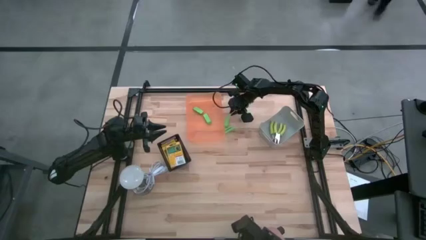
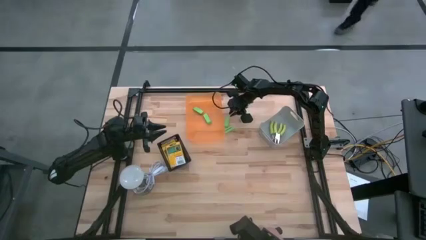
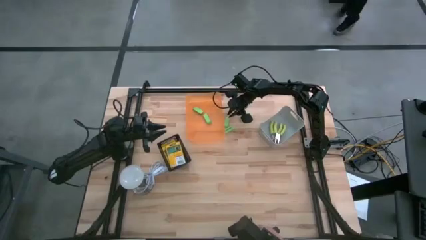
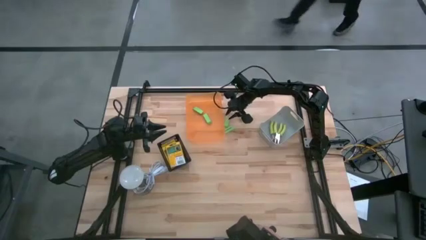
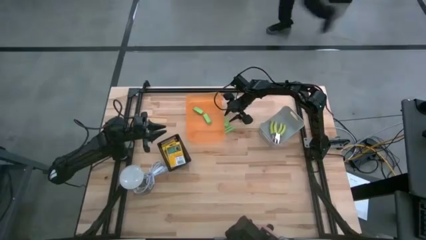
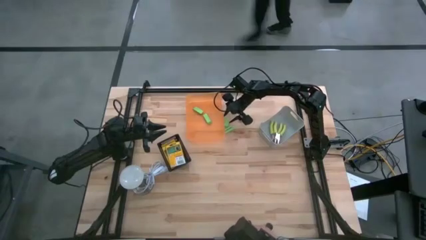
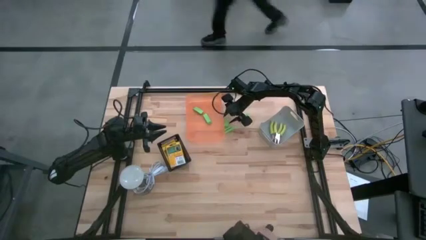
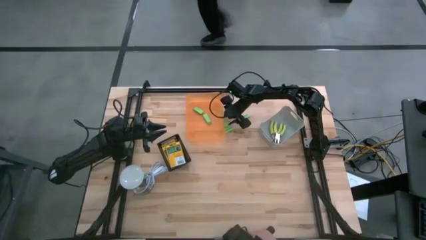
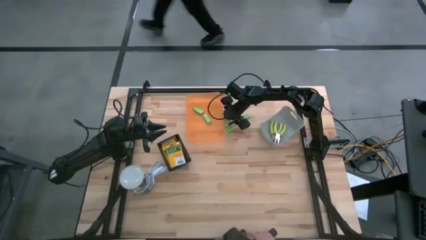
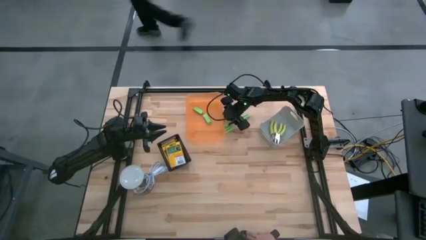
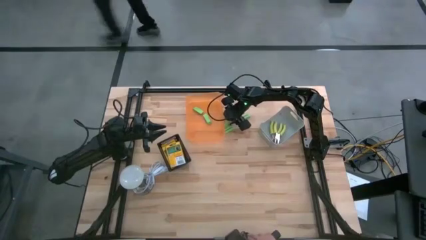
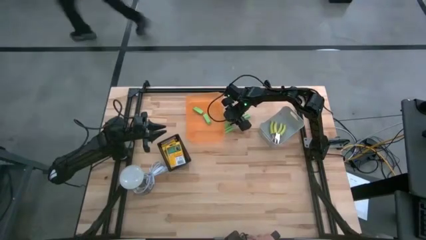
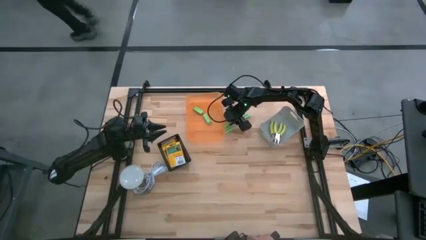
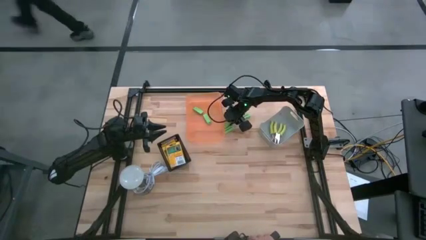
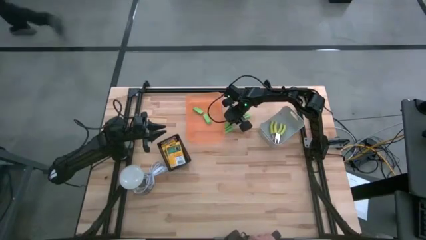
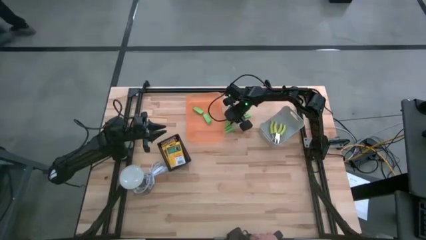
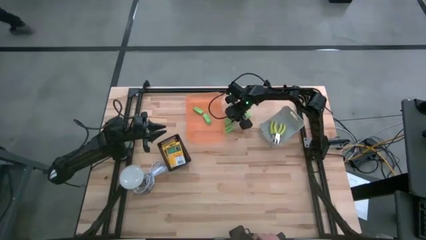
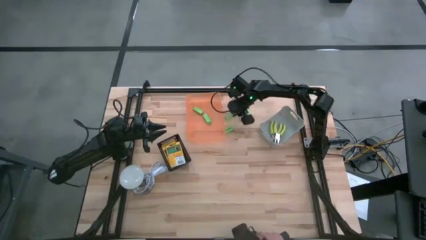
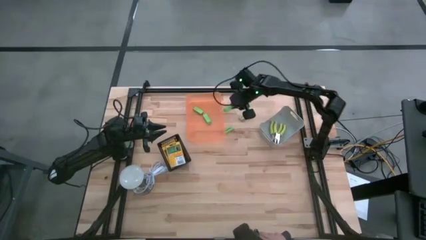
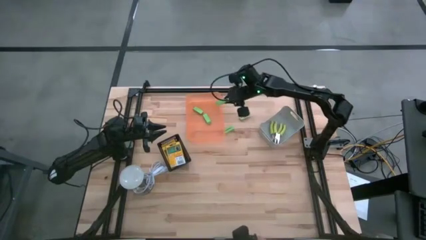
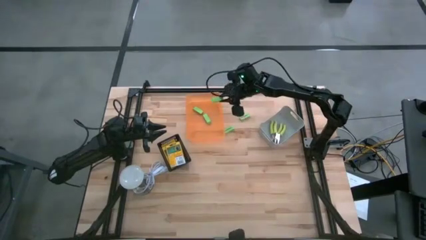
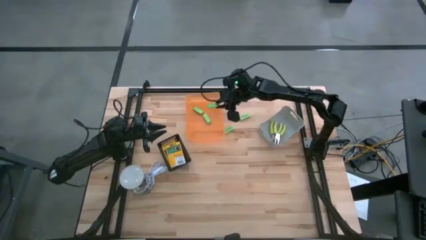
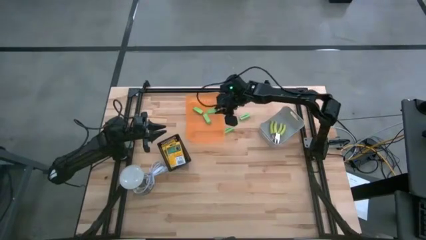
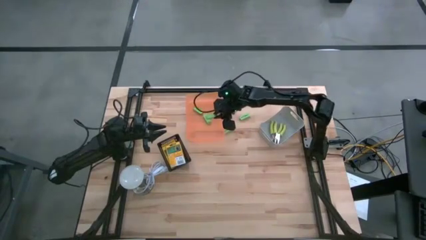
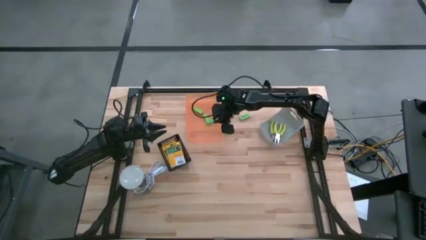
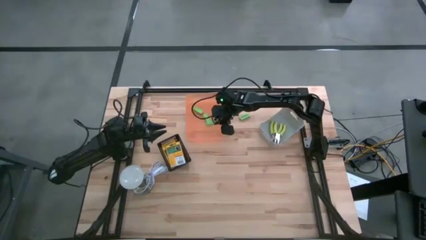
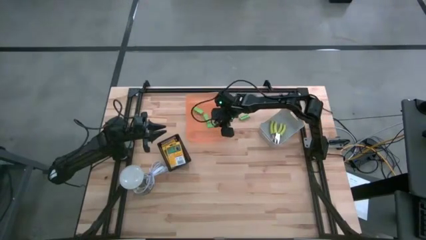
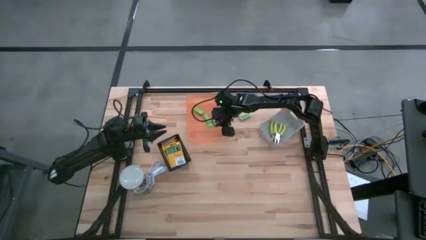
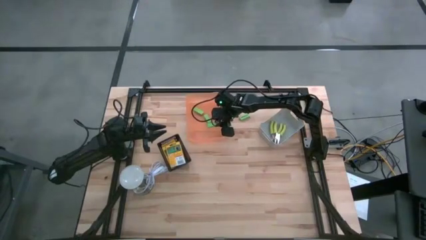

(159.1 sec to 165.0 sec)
Task: Pick & Place School Supplies
Put the top left green eraser into the orange bin

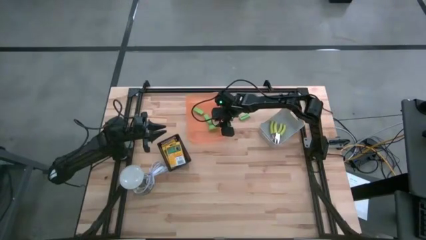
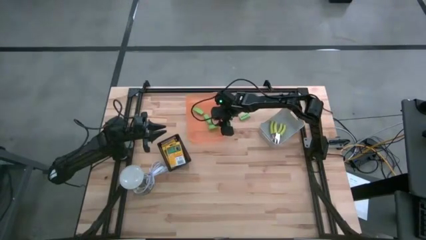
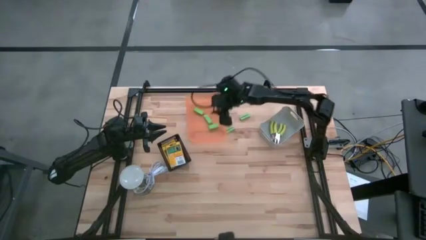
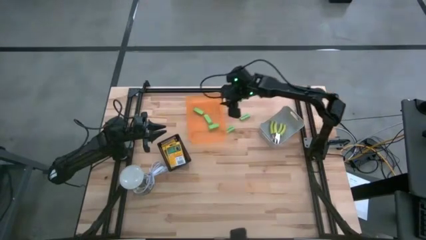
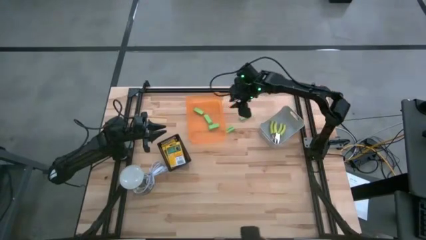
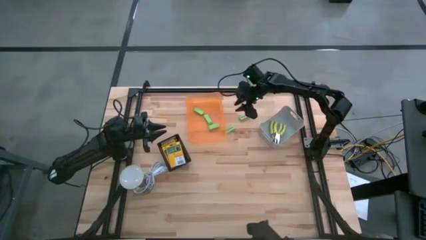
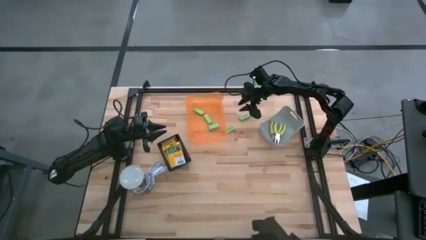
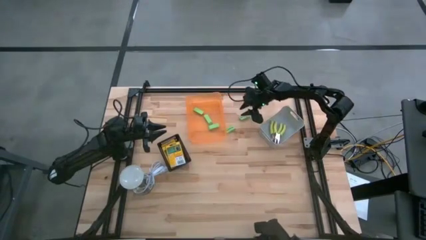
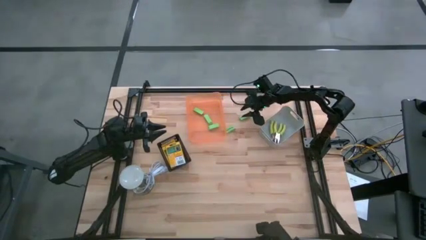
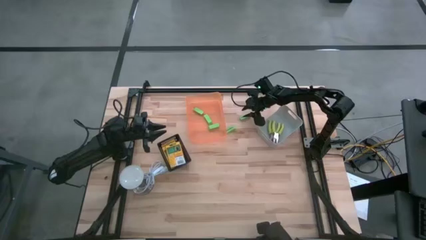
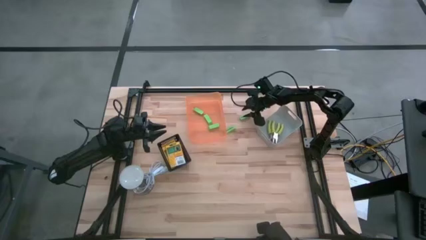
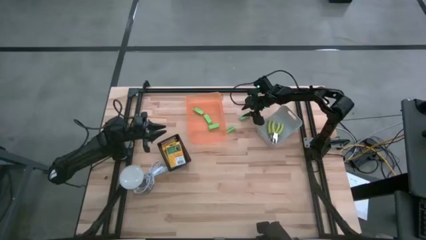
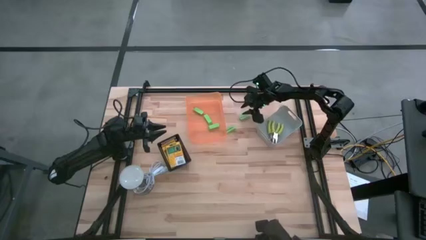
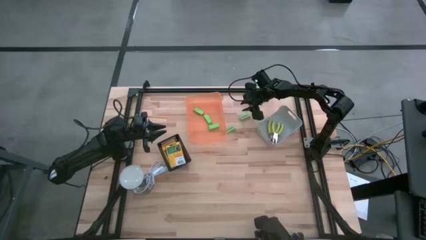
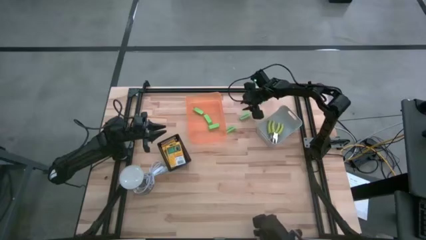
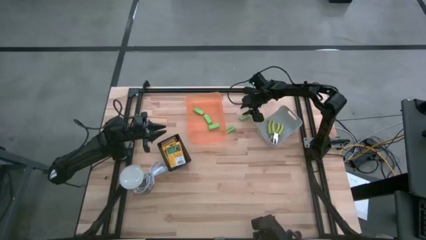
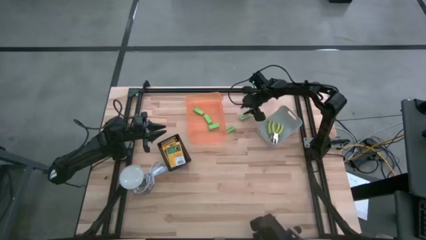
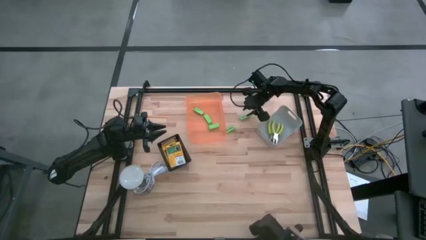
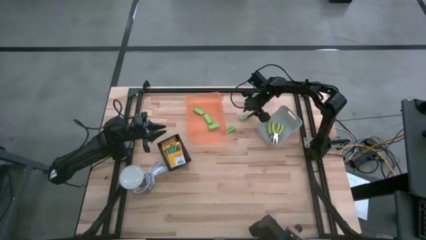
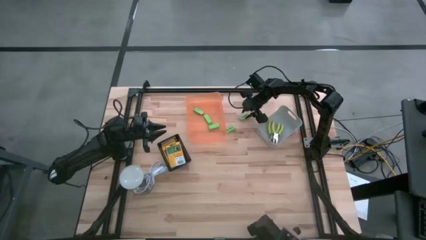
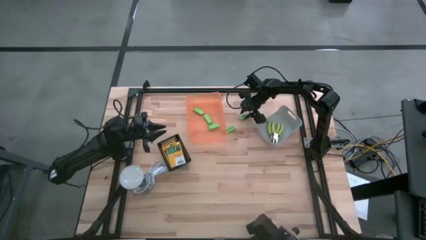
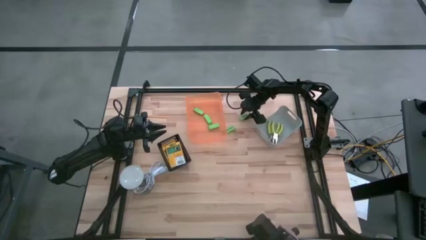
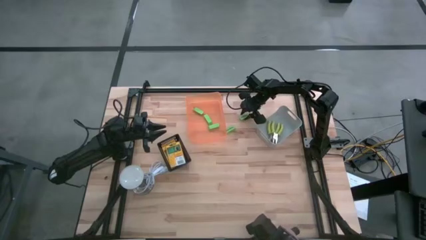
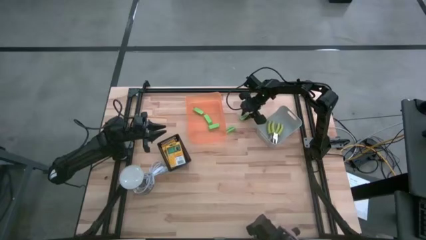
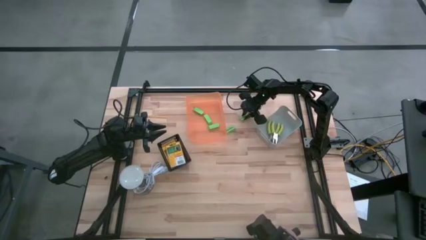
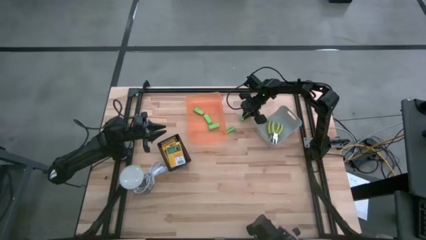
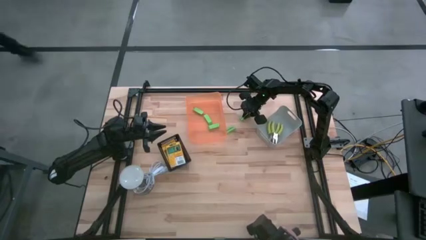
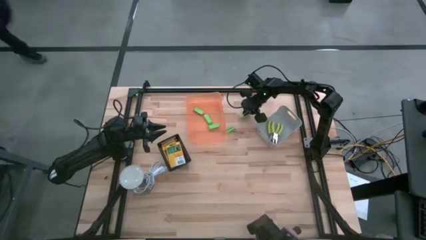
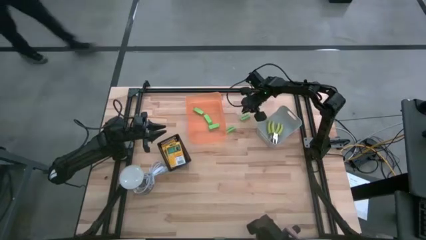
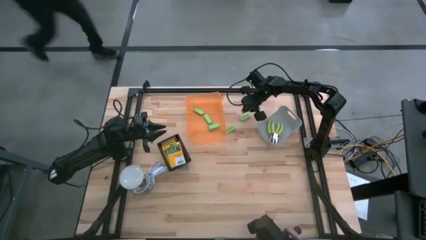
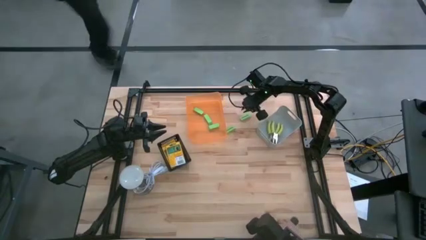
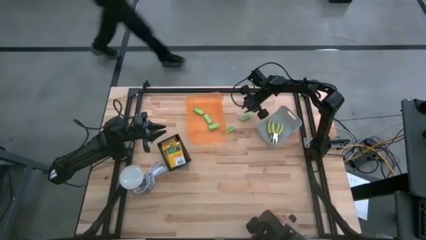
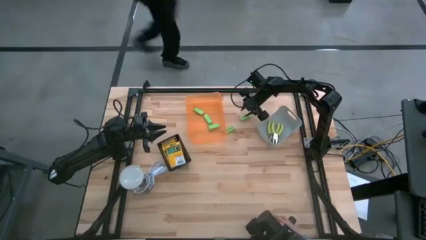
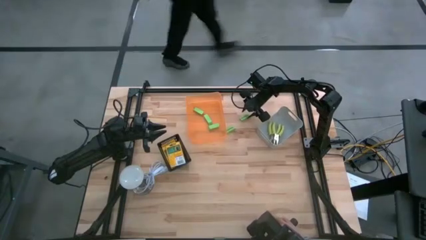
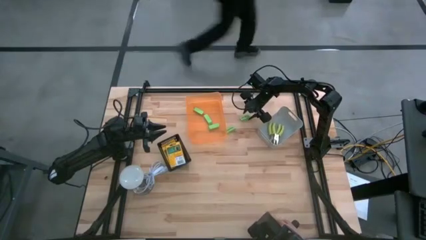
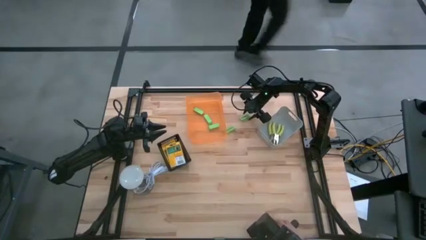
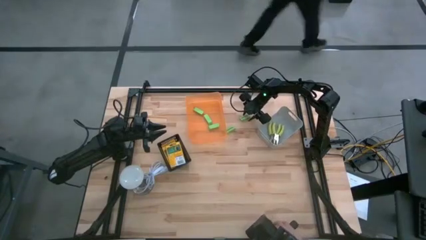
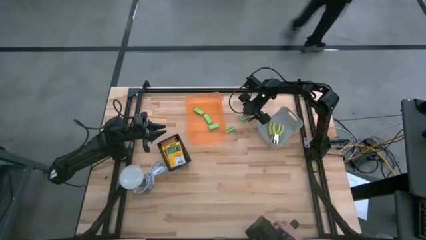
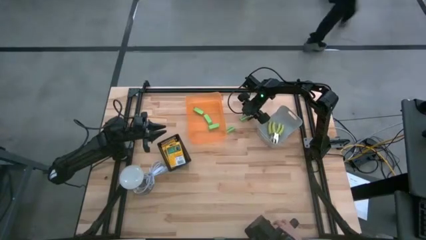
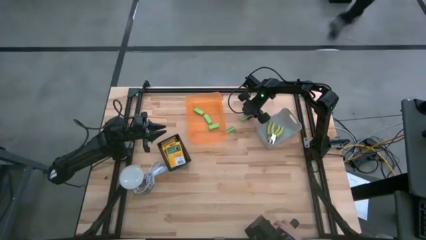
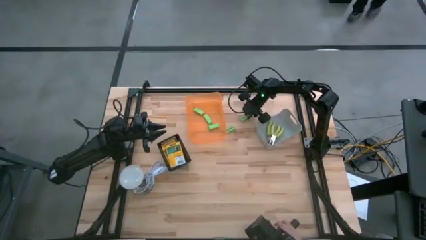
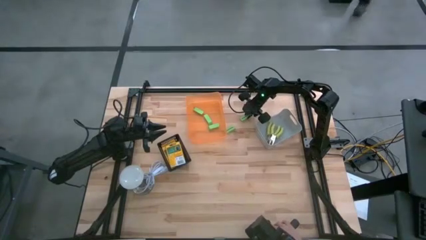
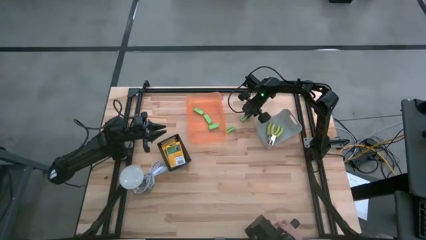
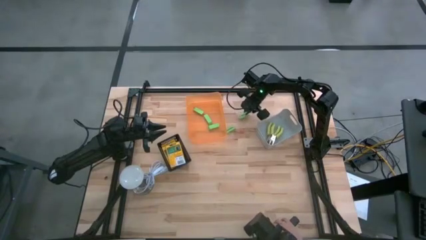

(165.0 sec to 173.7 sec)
Put the green eraser into the orange bin

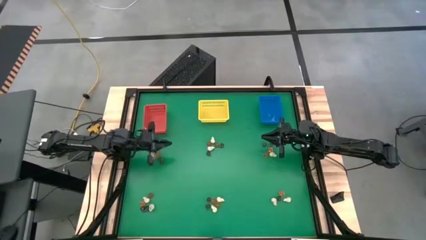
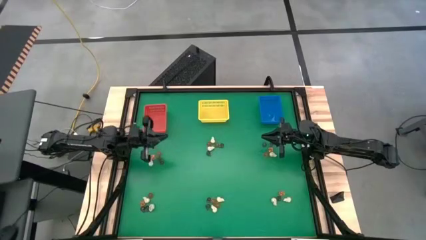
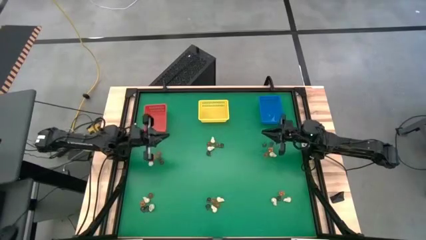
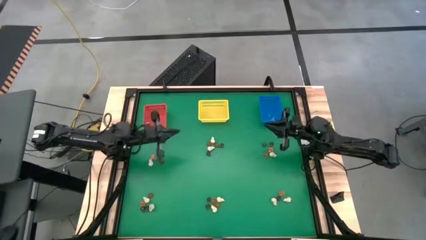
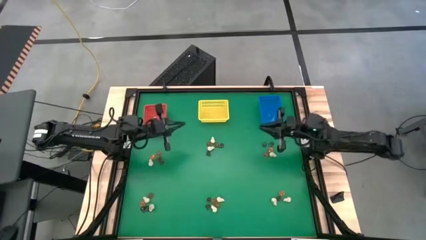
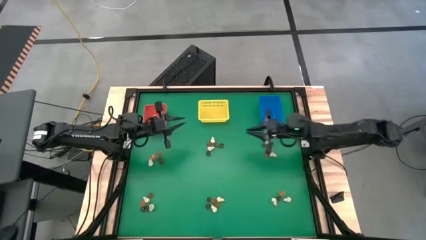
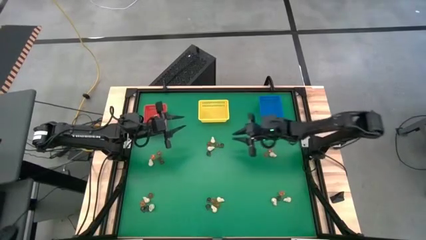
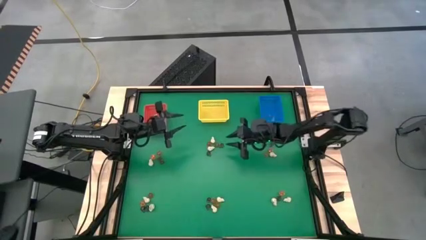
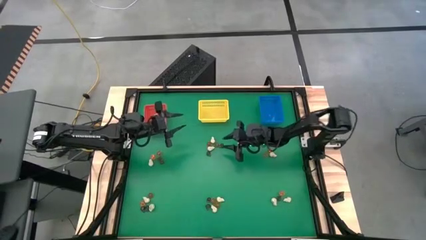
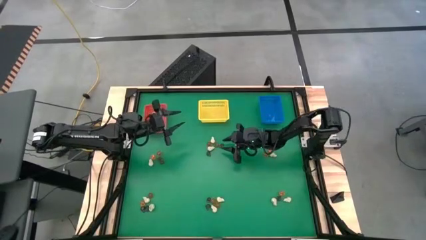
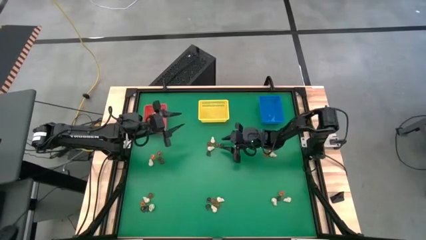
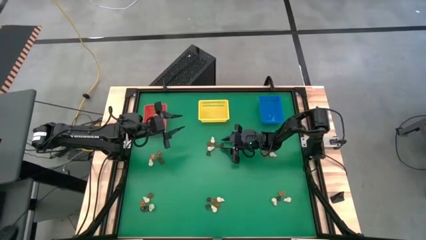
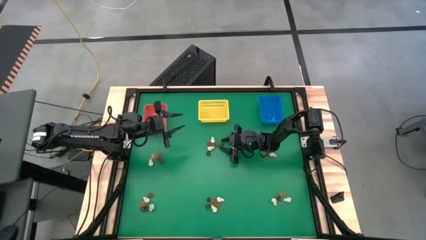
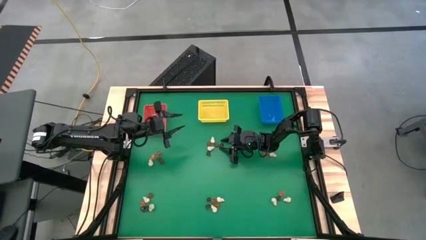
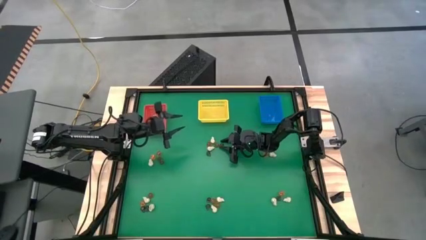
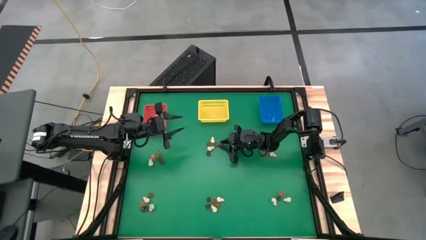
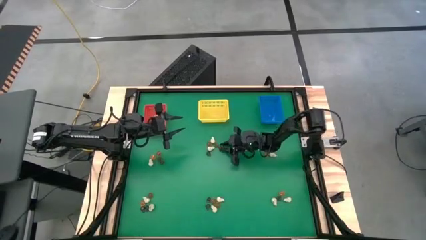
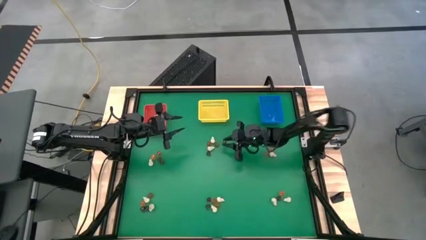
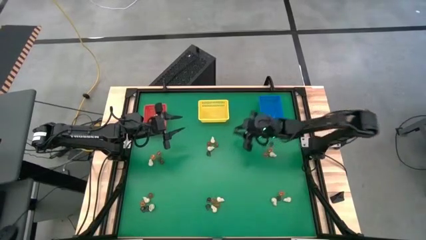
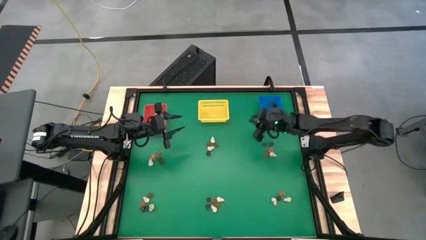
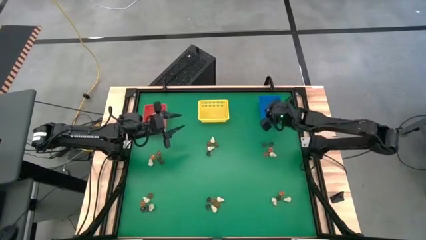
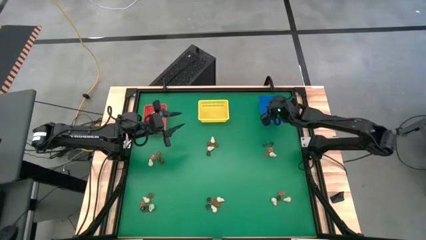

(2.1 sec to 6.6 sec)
Task: Sort Halloween decoration
Put the purple skull toy into the blue bin
